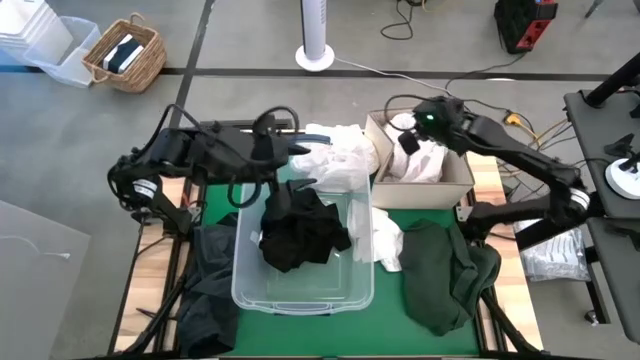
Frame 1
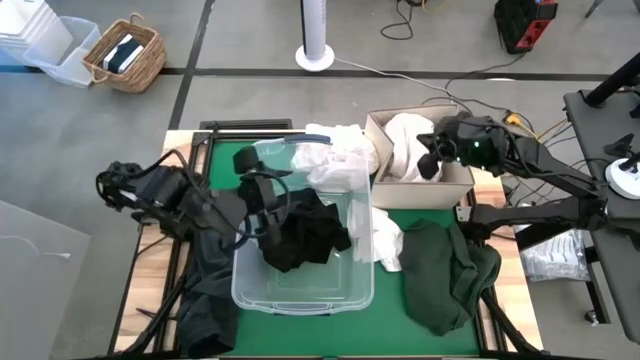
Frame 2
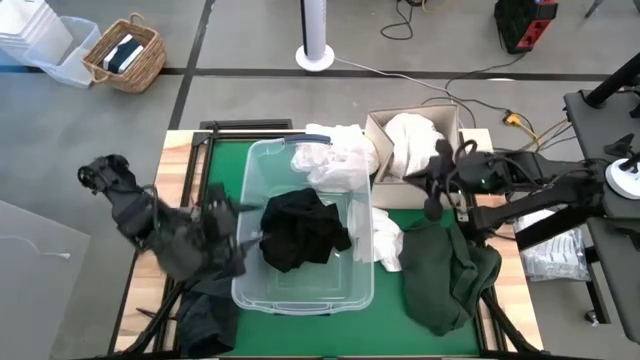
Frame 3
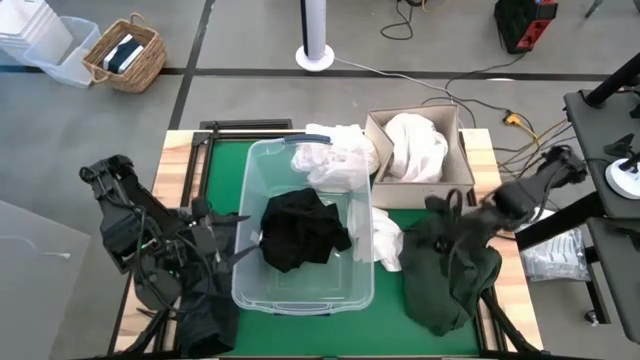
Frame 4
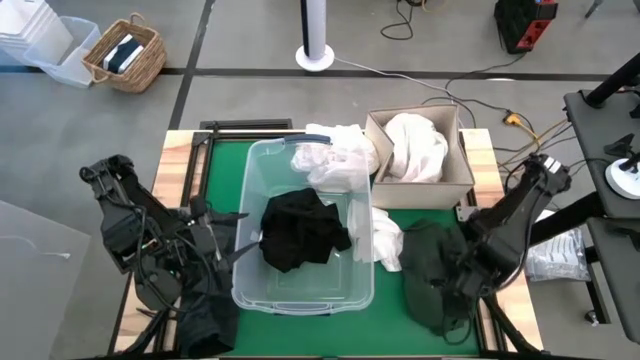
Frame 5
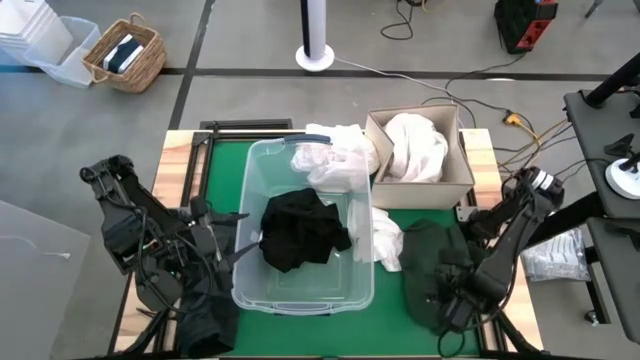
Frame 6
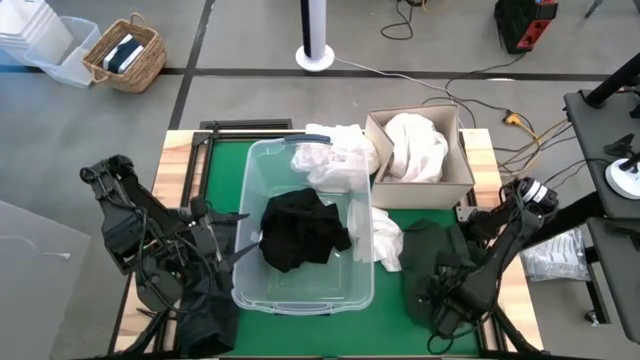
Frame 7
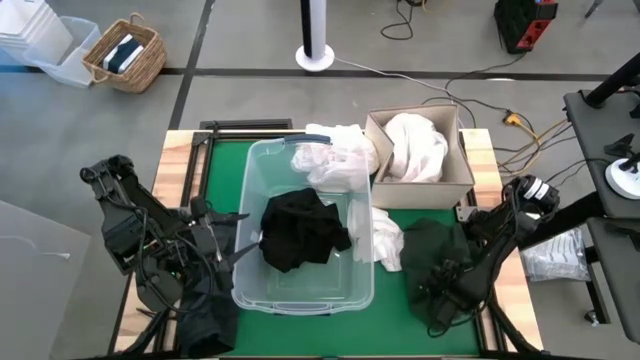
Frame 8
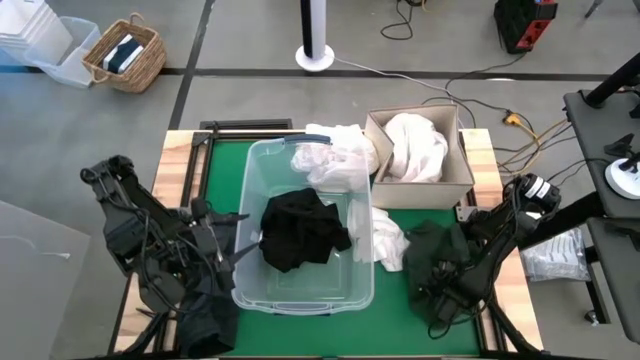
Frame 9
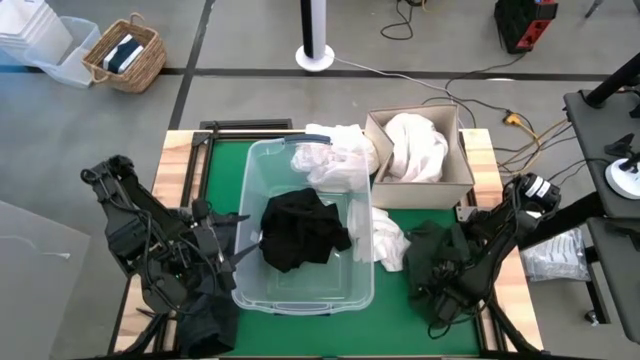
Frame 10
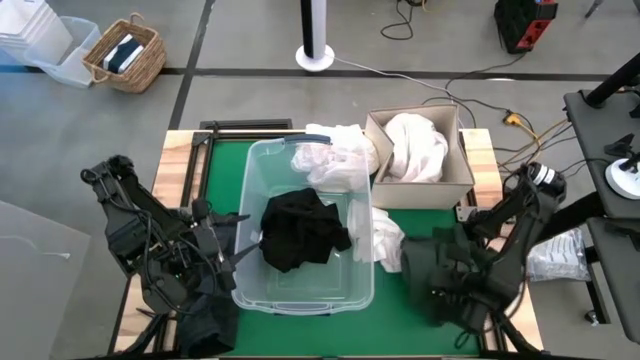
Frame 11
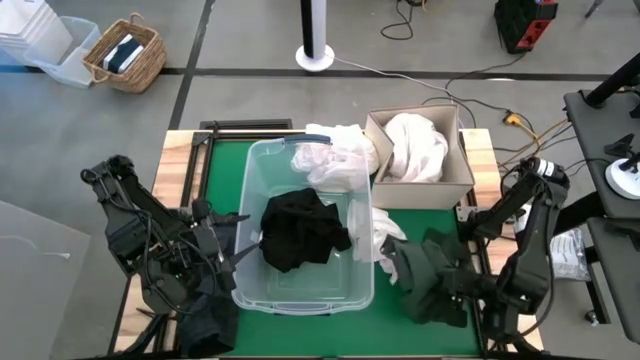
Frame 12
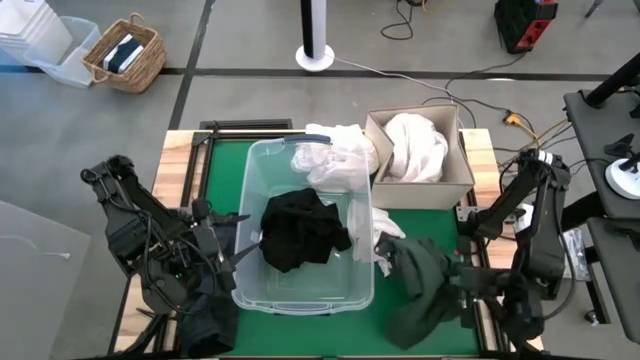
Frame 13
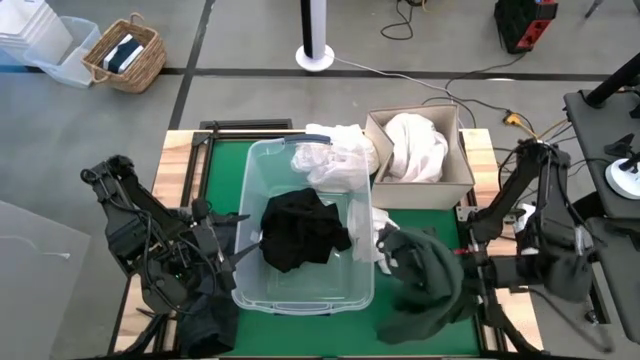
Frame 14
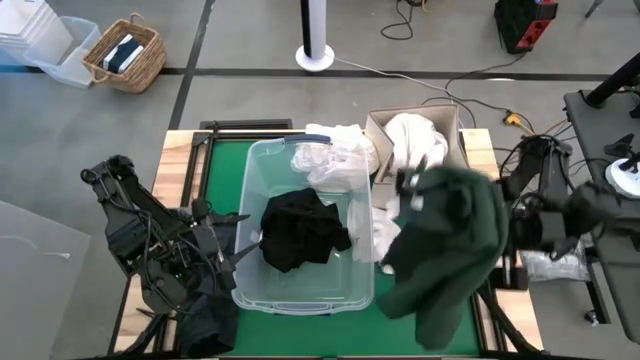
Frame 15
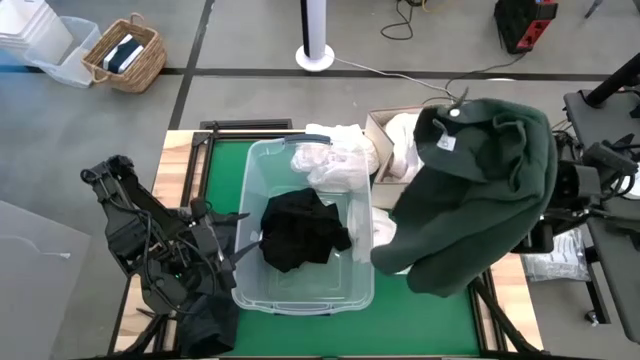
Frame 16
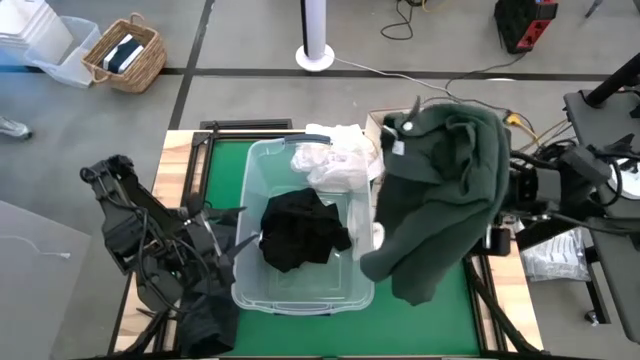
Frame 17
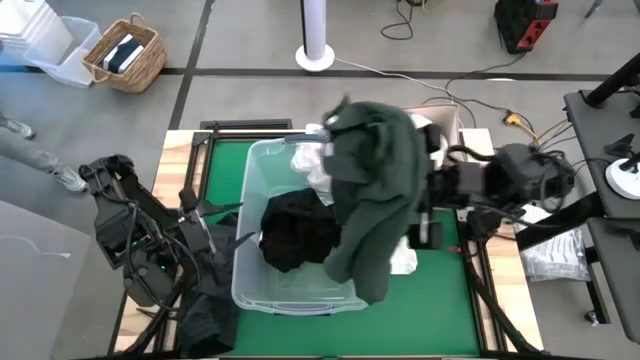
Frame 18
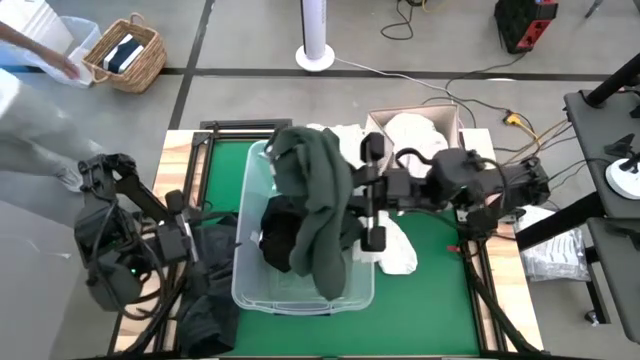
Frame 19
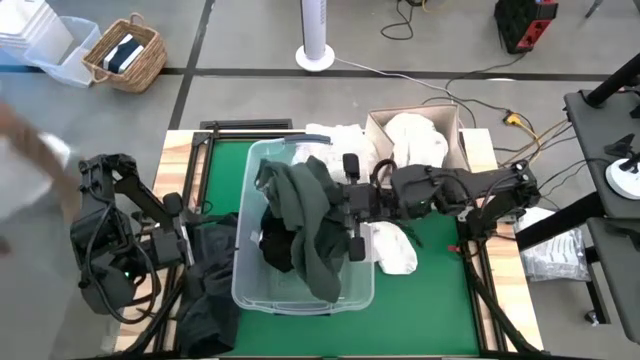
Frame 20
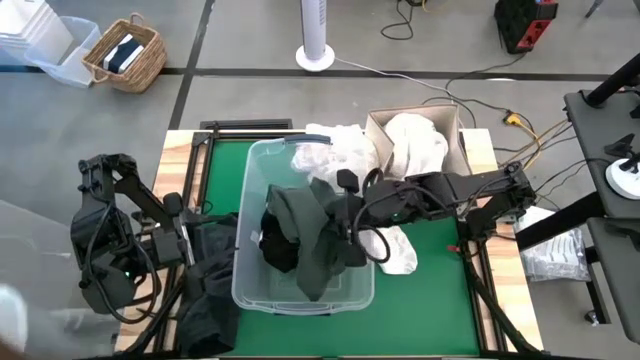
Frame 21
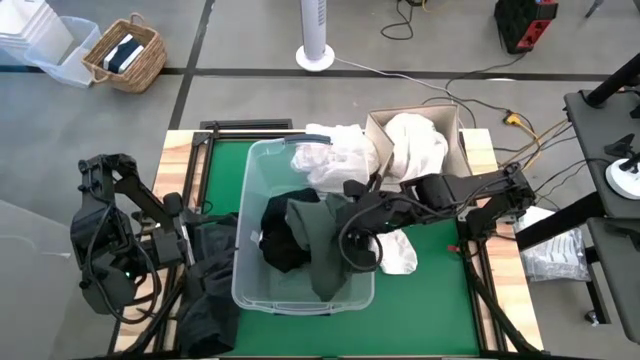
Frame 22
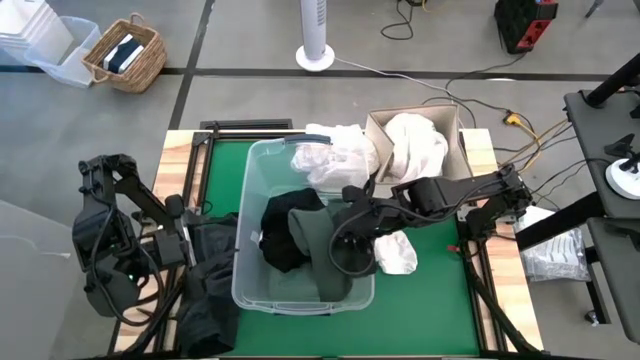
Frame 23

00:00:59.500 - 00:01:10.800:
Put the dark green shirt into the transparent bin

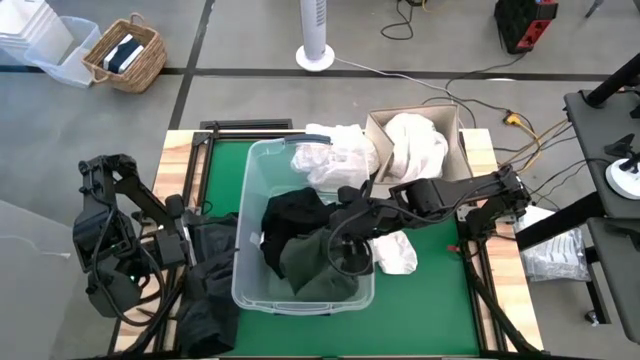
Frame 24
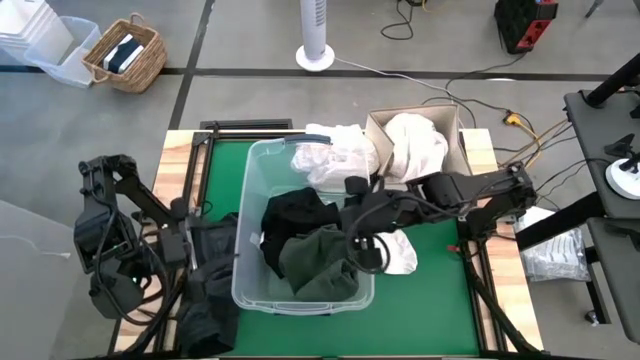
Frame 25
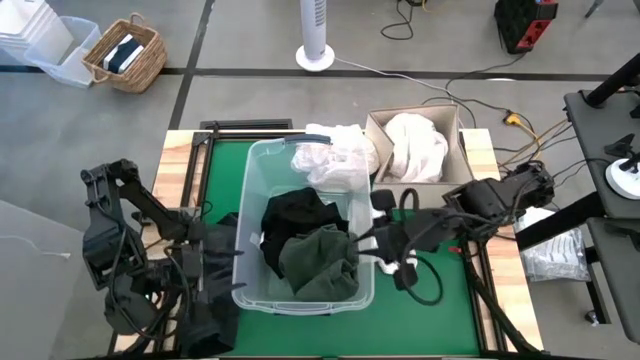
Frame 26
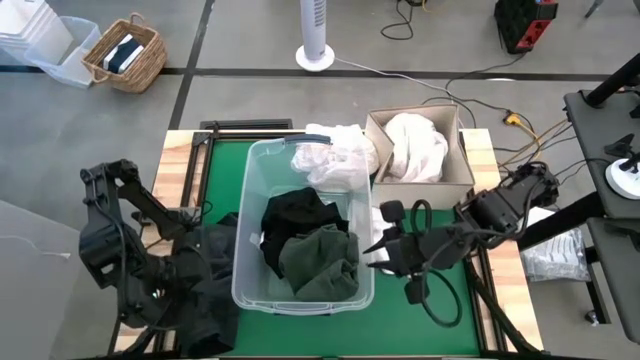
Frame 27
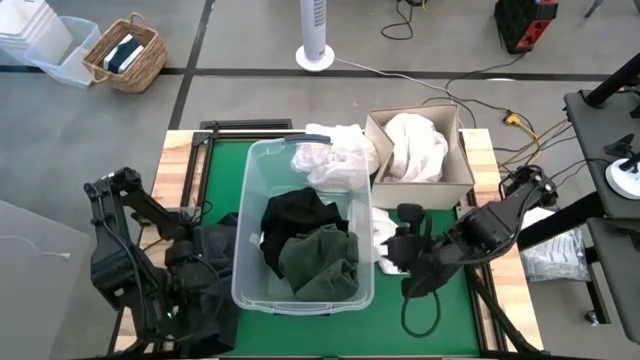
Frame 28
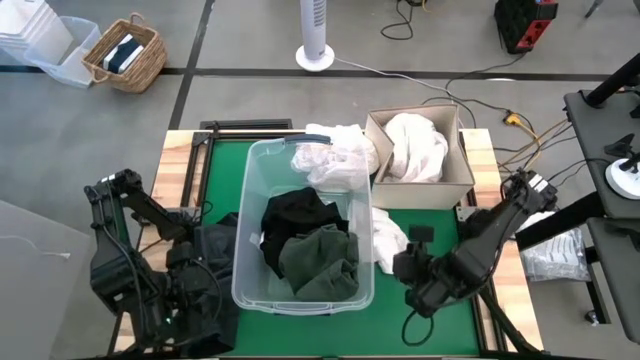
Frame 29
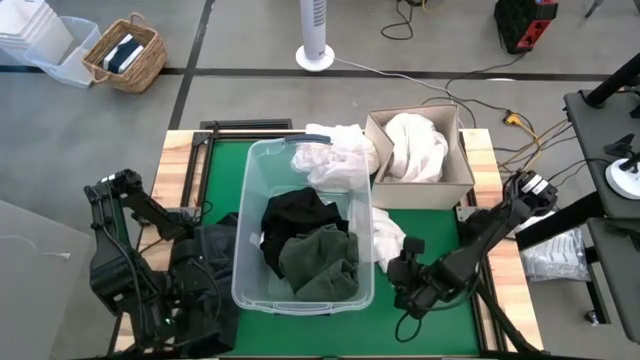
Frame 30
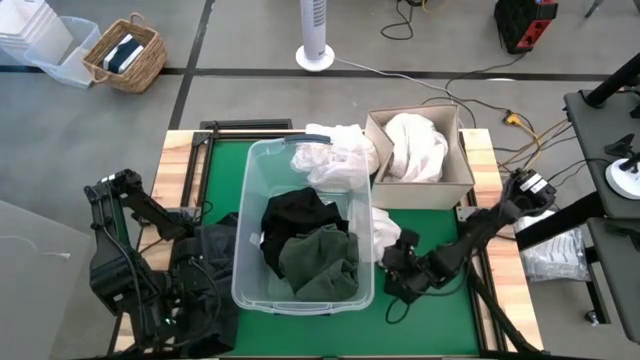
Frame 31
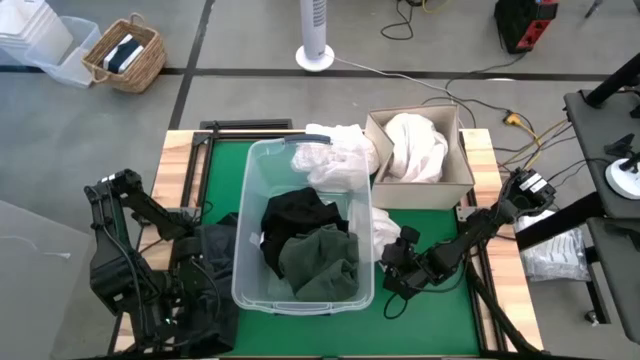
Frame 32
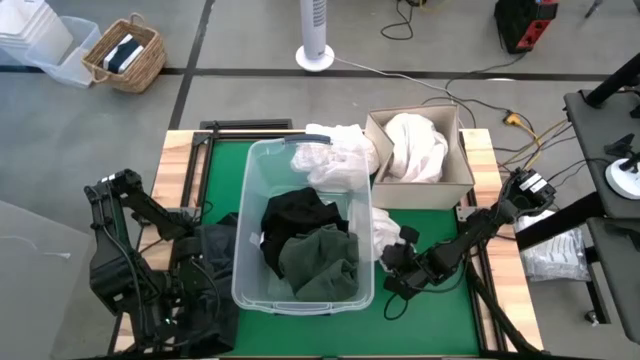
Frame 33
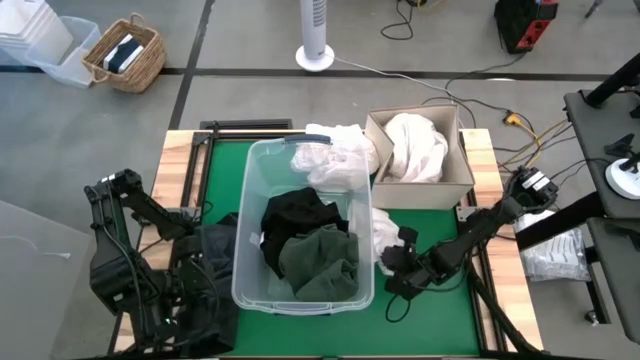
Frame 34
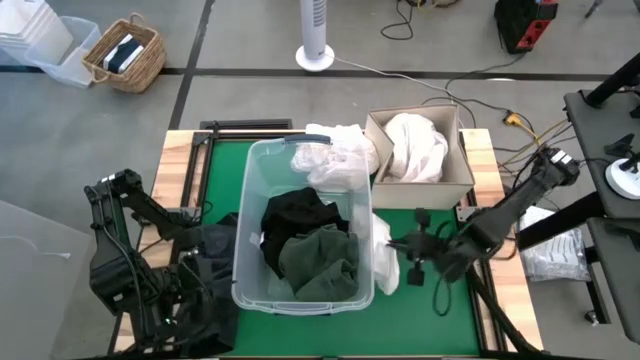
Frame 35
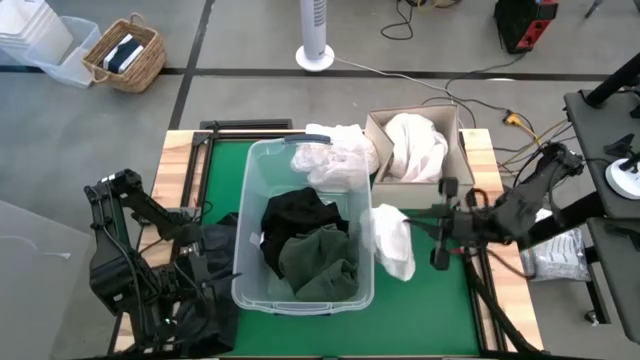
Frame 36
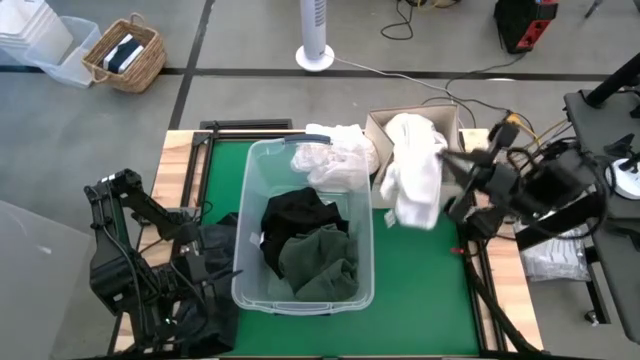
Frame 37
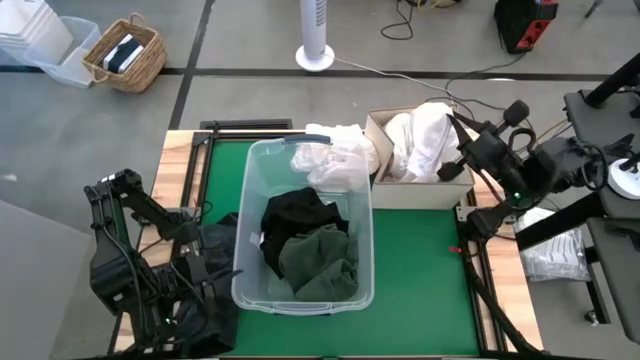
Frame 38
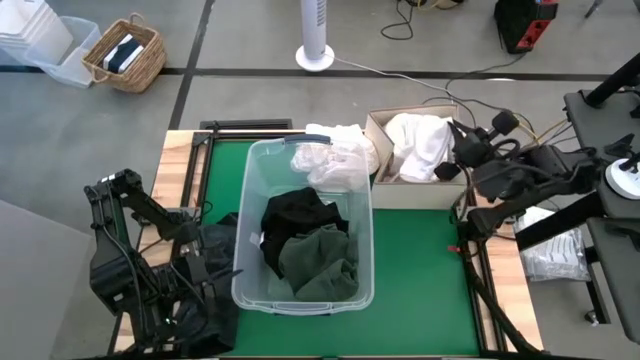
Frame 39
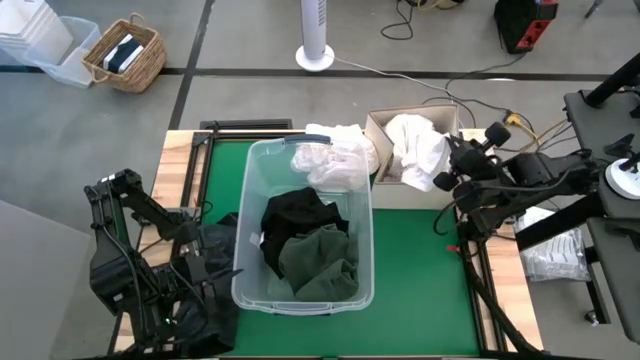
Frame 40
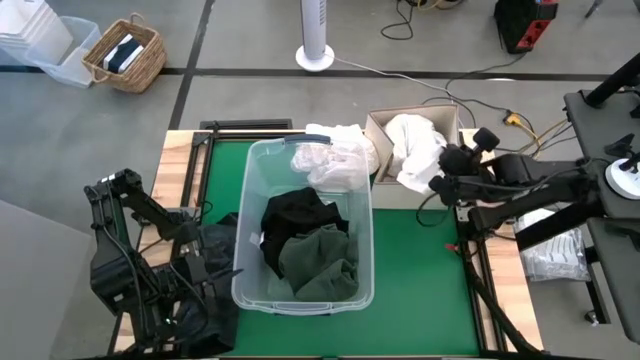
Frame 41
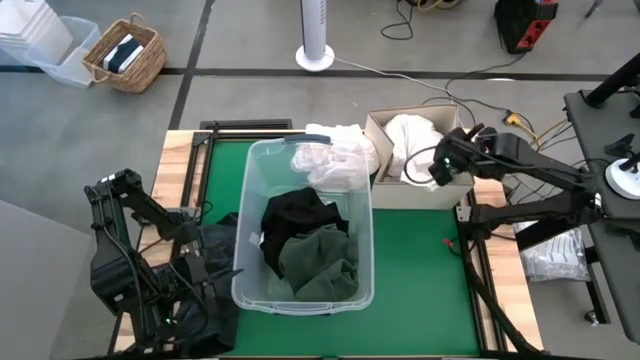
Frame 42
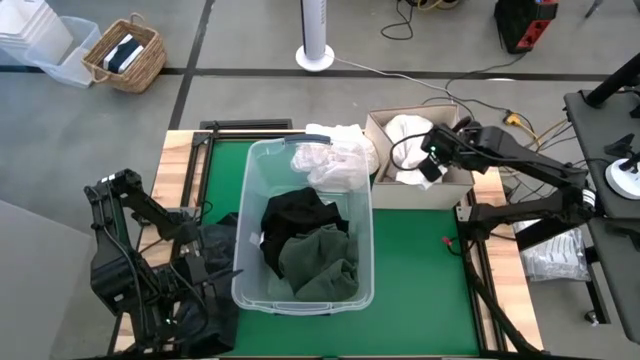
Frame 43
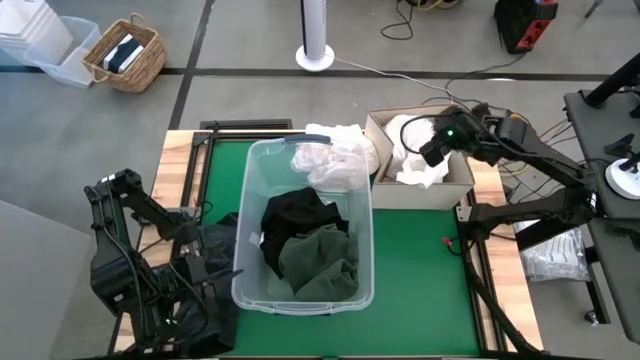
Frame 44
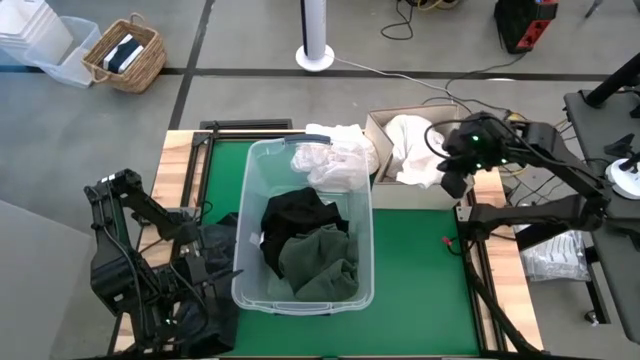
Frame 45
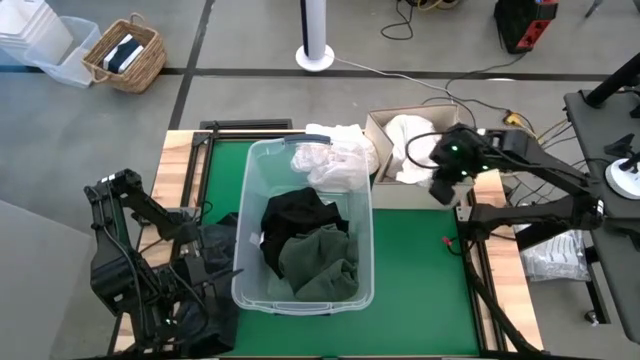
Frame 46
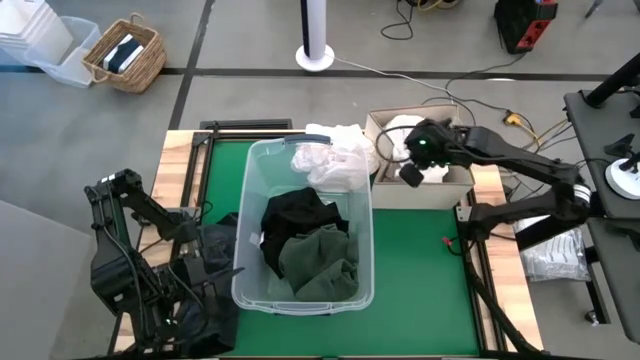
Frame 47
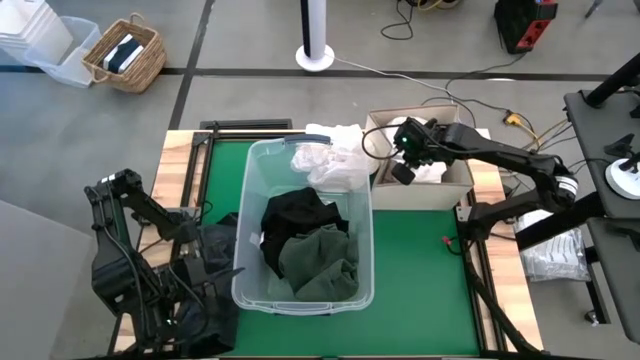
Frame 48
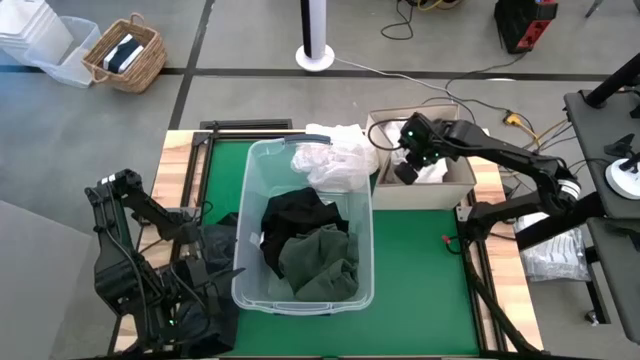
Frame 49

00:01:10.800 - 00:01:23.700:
Put the white pants into the laundry organizer
